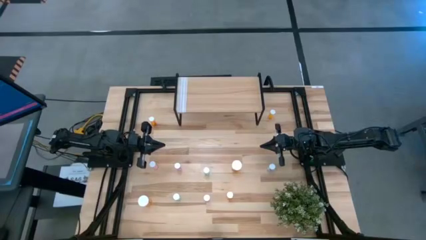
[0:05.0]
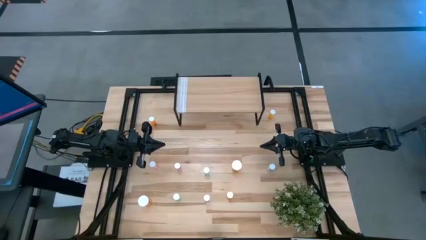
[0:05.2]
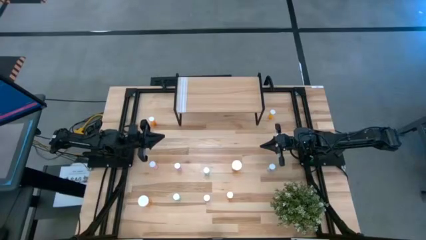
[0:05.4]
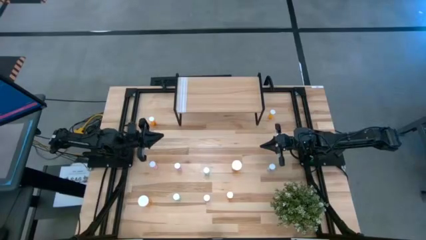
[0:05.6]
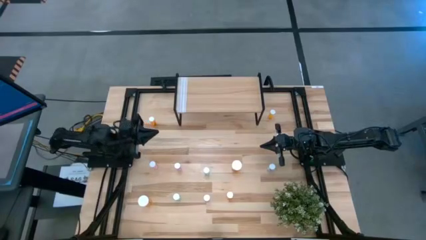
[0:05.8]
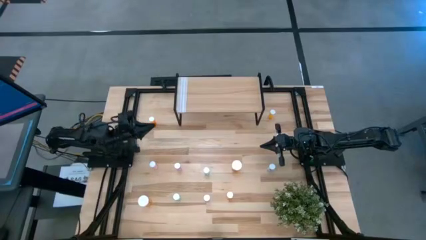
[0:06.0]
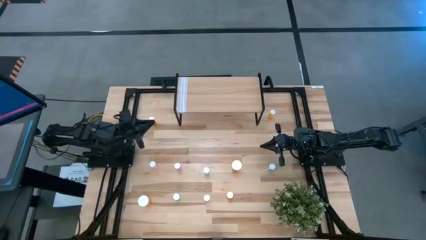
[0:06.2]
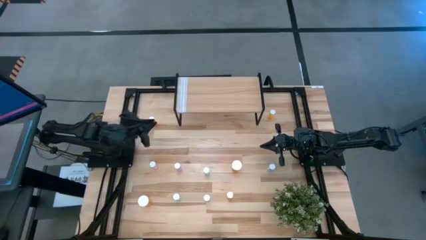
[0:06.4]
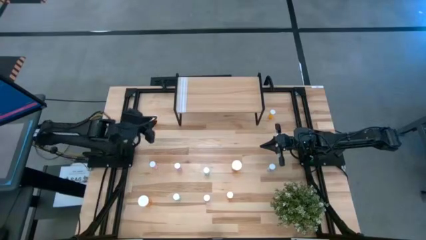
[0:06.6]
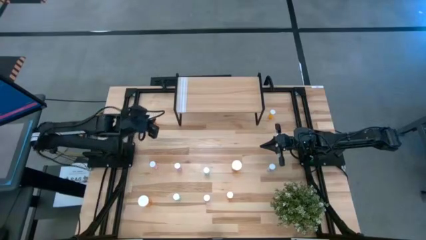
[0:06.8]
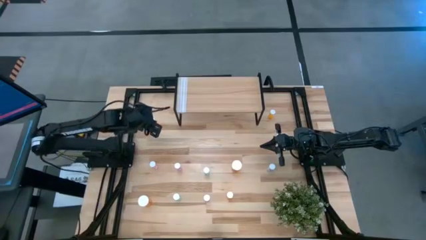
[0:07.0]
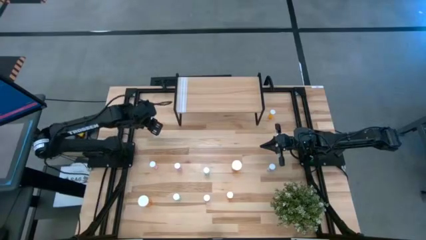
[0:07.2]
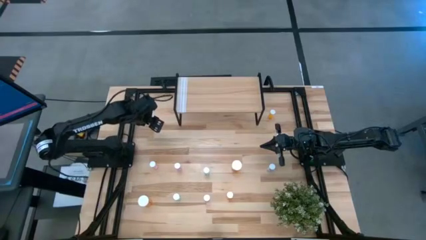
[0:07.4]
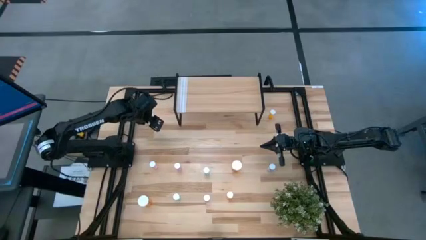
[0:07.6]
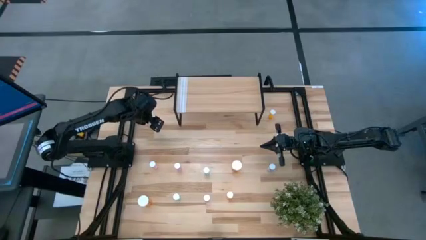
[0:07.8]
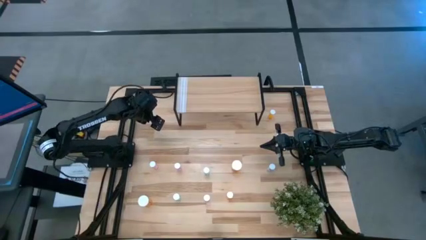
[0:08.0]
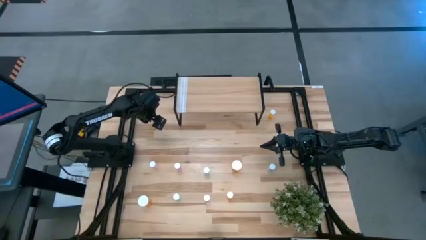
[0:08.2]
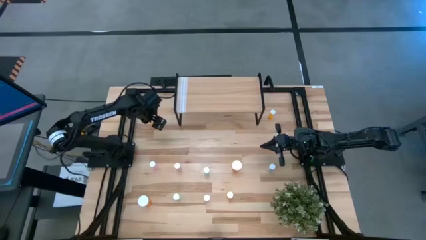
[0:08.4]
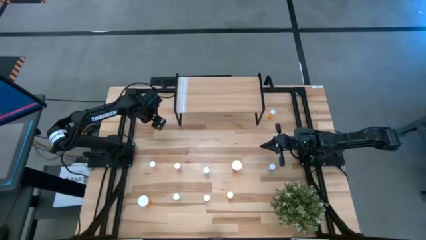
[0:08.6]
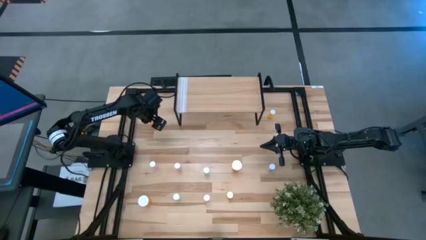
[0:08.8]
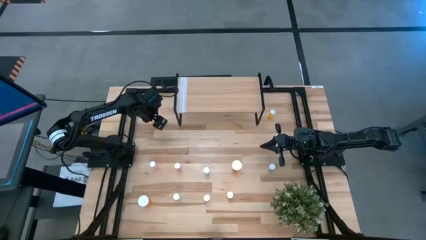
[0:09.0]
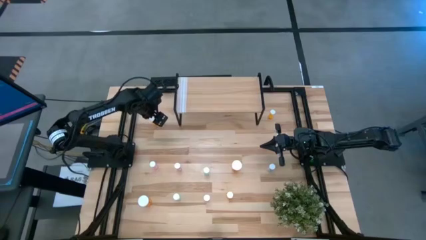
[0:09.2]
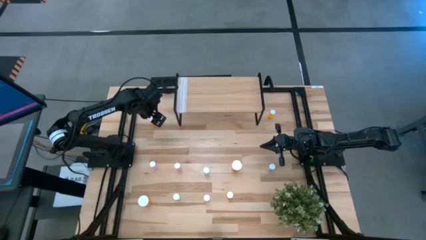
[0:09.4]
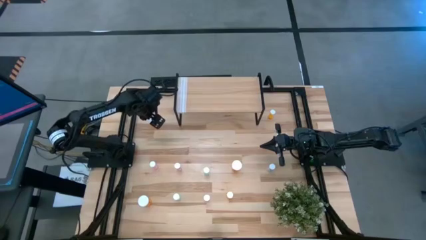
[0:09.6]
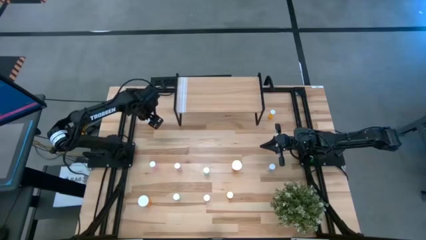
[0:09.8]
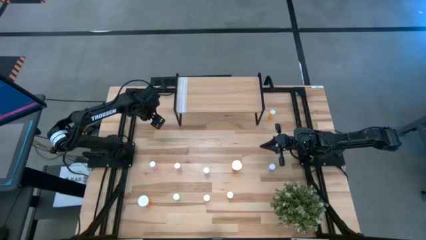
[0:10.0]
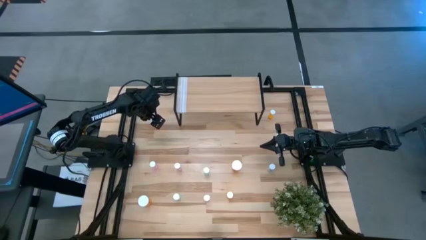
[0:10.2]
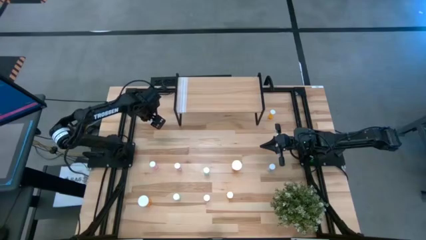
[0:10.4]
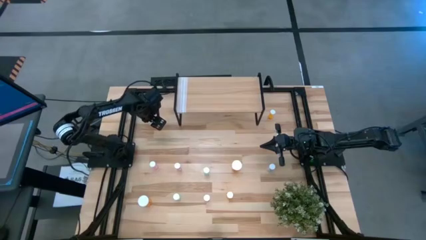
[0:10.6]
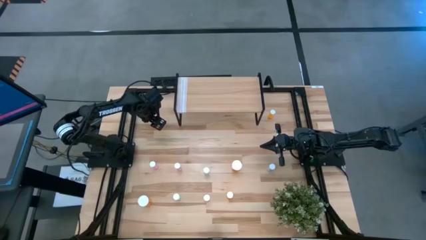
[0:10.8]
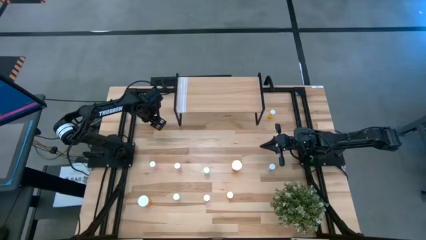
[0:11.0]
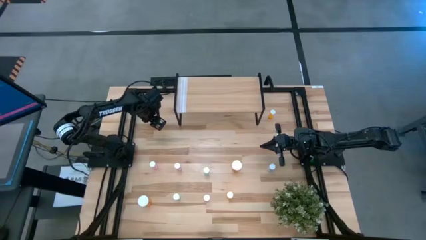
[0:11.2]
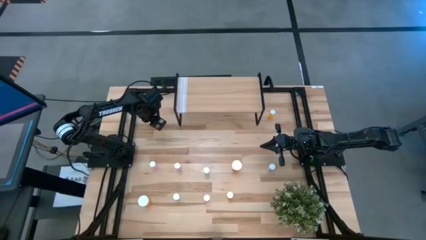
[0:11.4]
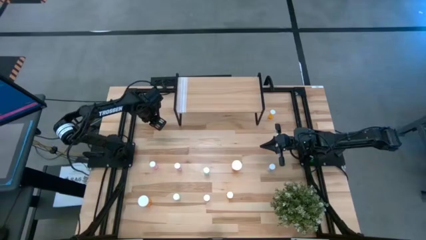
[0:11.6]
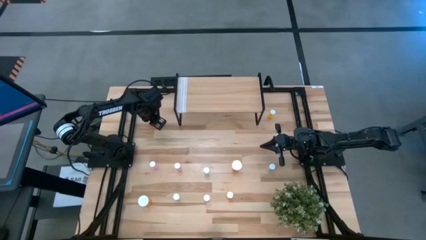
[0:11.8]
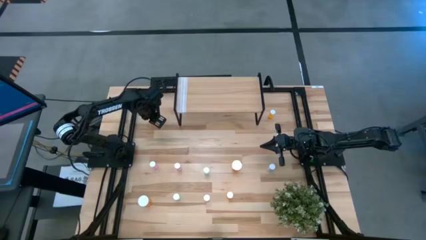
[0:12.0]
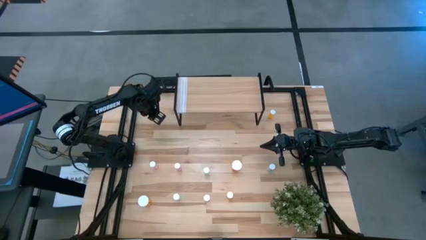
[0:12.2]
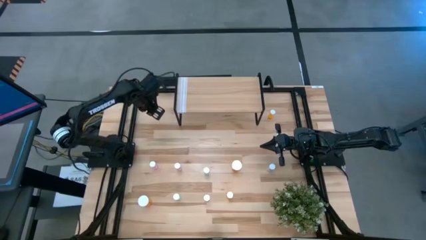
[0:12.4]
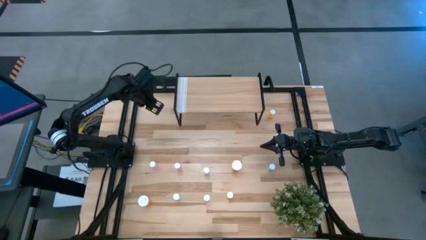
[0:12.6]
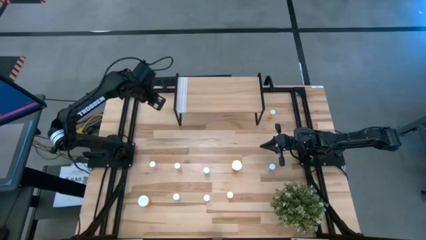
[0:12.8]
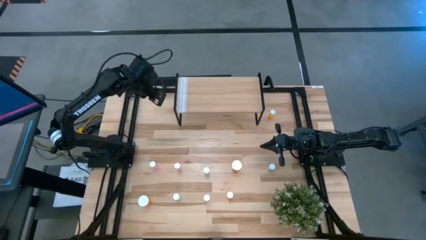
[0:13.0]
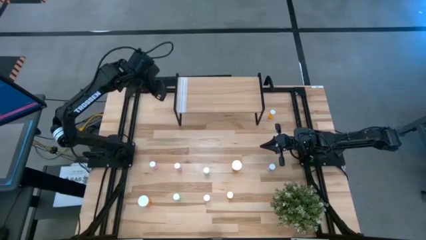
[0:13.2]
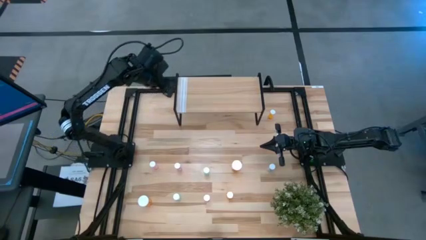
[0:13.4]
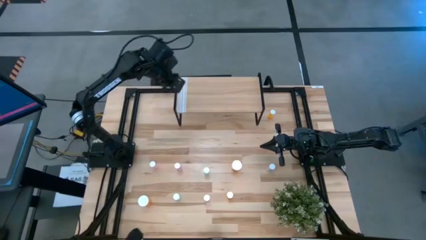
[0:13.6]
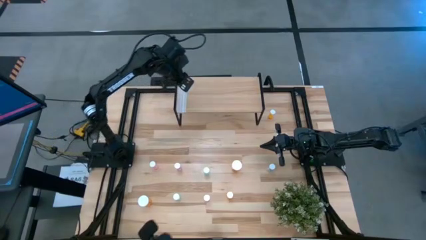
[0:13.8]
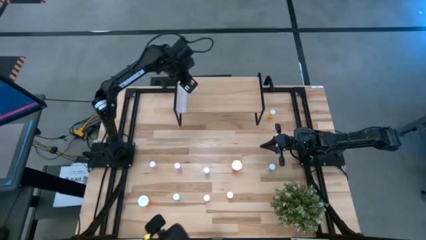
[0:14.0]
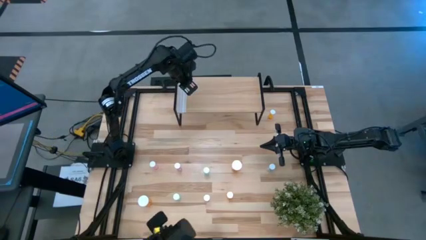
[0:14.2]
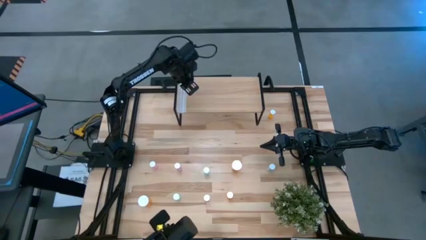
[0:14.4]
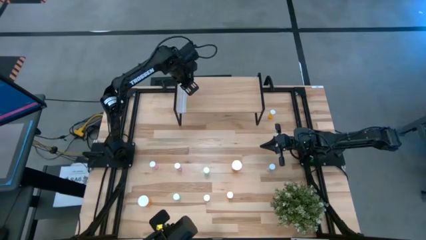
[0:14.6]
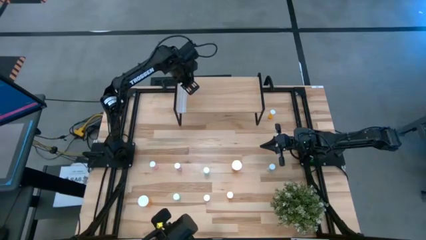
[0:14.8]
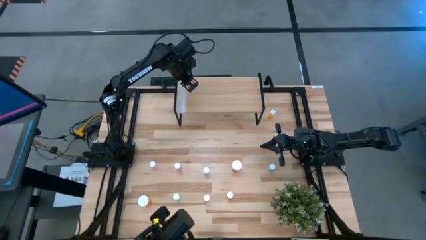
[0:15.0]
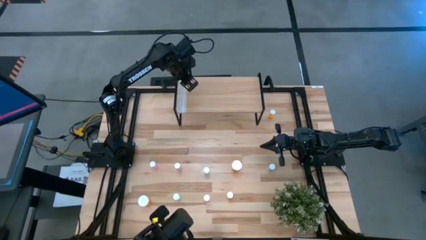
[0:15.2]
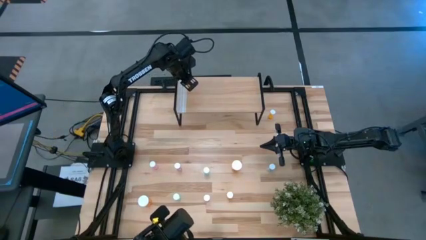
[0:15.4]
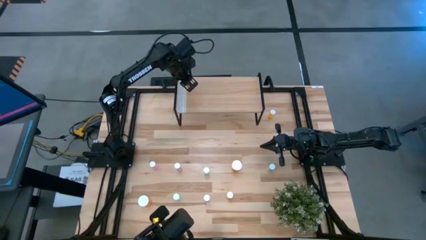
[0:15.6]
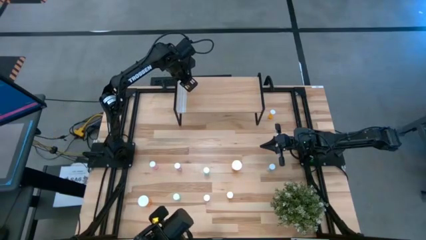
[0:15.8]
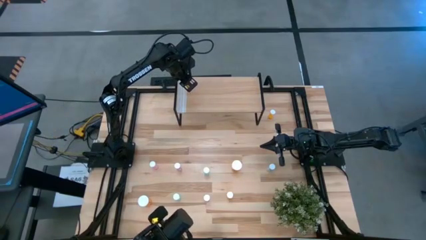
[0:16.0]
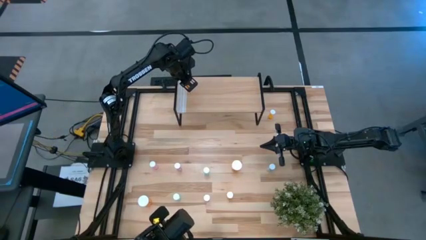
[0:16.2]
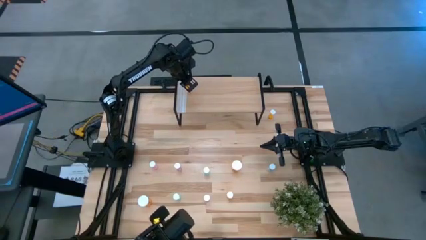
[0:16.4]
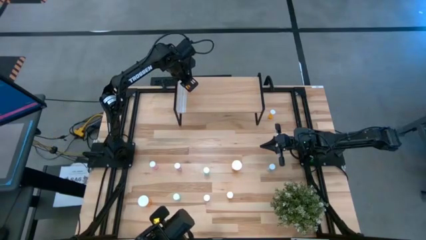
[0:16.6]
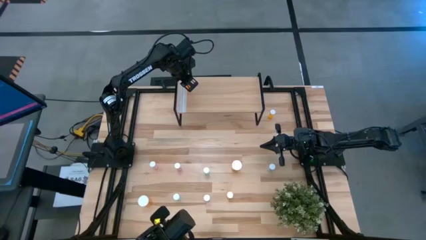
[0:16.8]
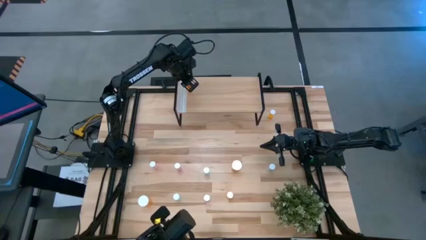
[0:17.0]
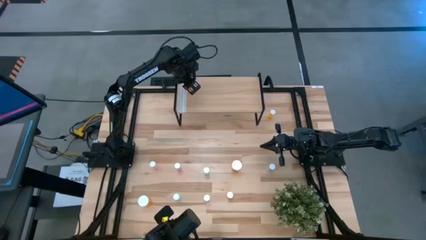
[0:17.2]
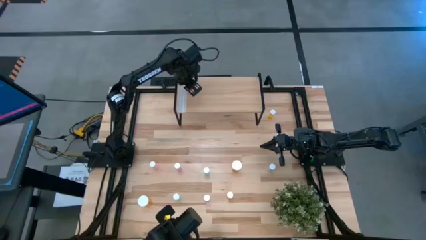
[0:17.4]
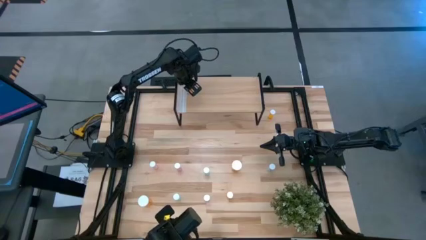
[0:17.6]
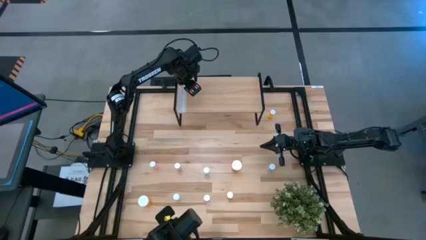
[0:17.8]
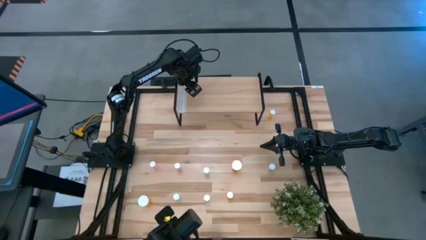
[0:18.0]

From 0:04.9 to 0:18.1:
Task: Pick and place medicine bottles onto shelf by color
Put the top left small orange pill bottle on the shelf

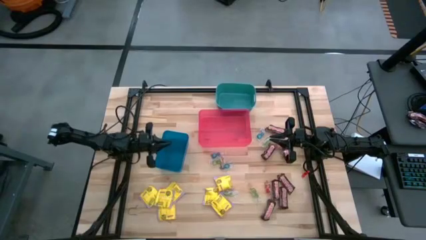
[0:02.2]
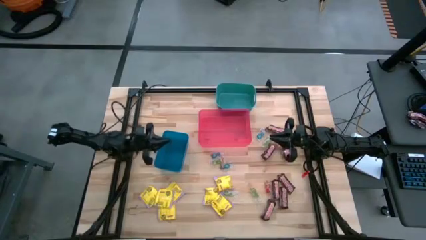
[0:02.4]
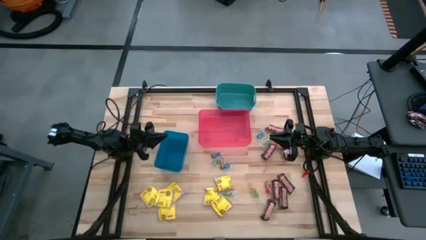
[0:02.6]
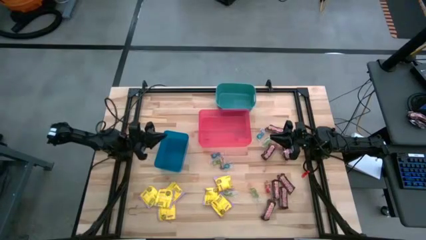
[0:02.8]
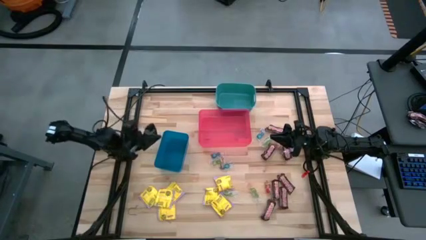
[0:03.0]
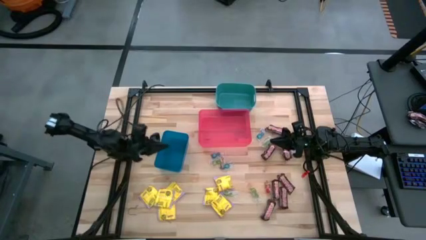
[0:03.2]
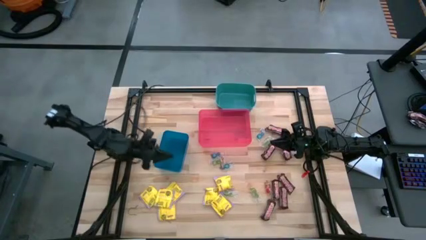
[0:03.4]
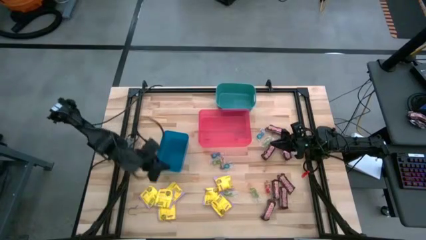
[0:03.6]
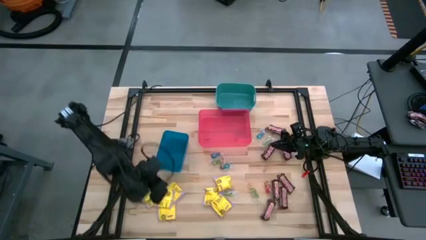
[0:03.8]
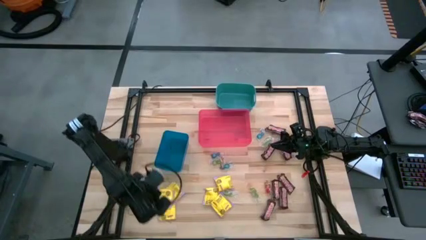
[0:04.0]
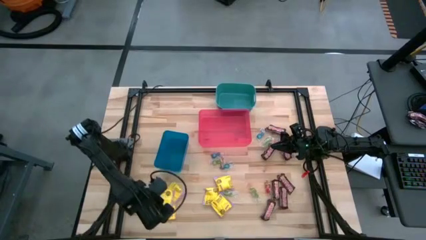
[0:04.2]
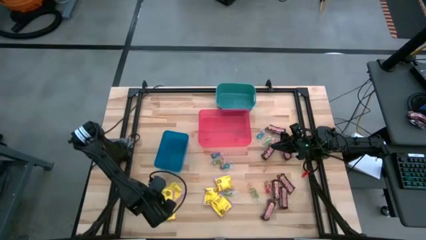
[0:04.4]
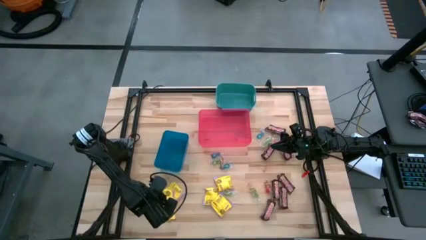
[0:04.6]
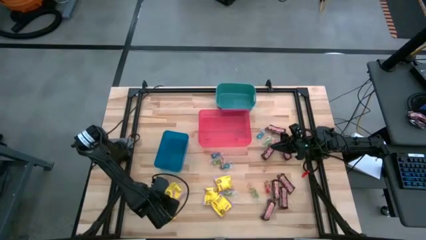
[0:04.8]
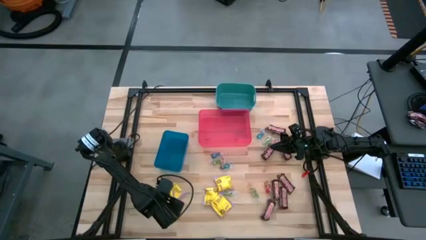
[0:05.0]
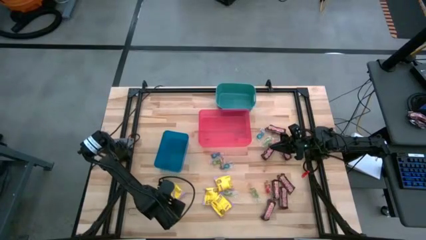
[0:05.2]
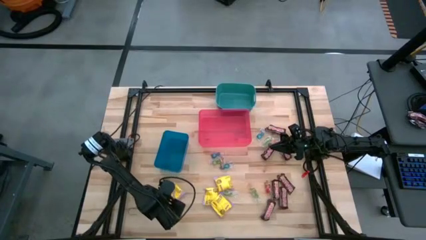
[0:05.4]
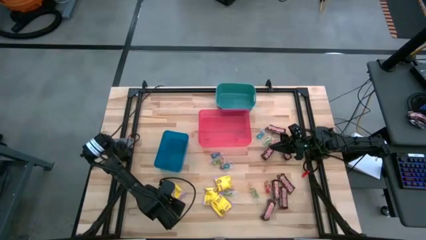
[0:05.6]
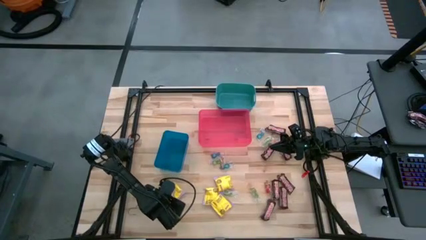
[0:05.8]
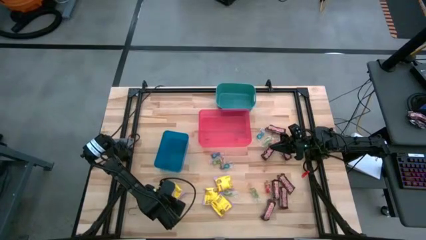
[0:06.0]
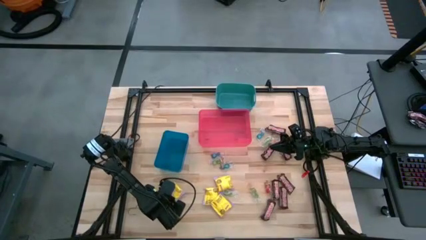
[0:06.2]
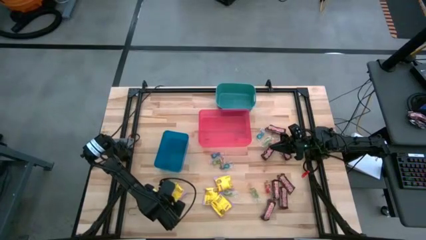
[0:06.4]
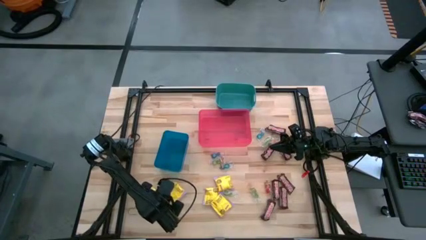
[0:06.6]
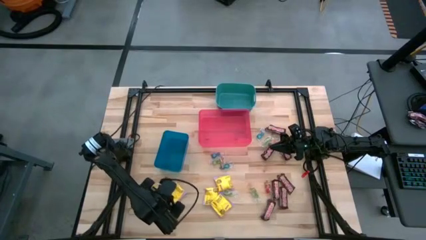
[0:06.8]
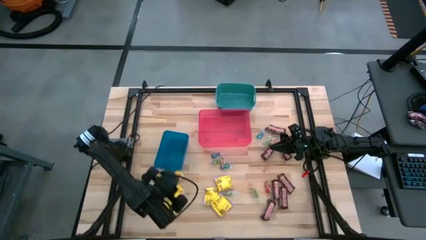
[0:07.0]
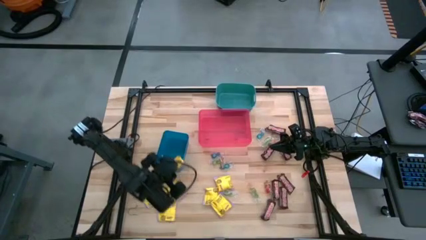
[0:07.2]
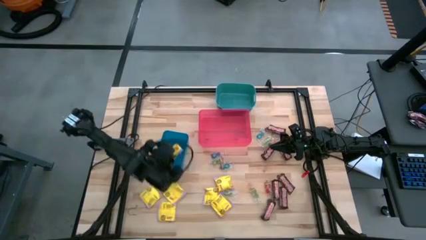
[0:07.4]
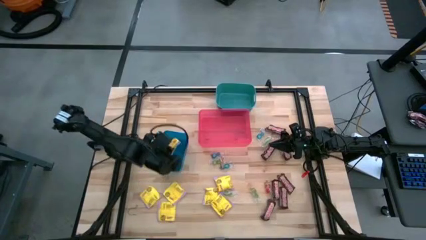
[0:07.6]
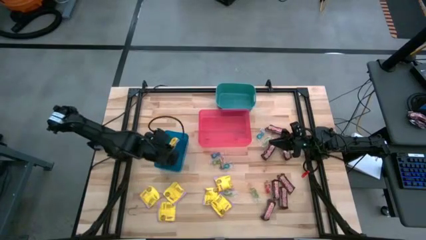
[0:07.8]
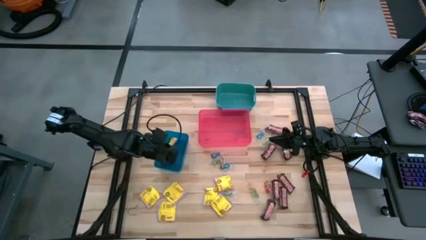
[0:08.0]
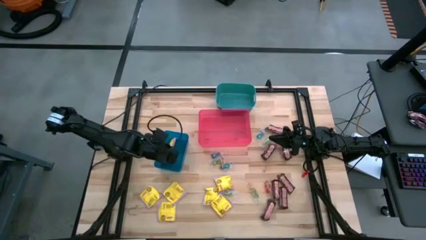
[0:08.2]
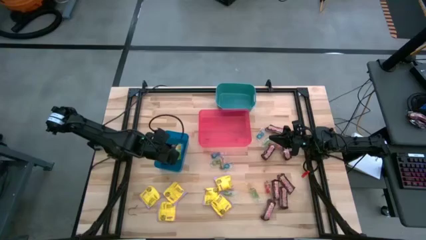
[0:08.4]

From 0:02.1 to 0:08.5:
Task: Sort candy
Put the yellow candy into the blue bin
